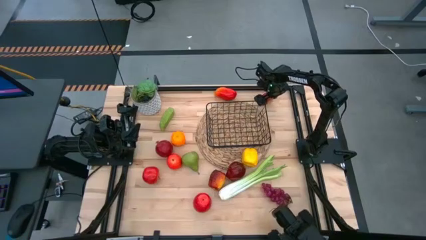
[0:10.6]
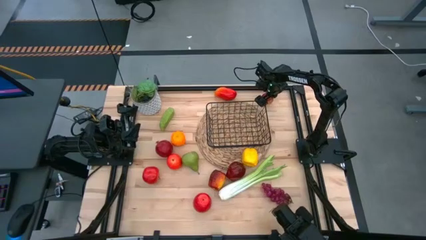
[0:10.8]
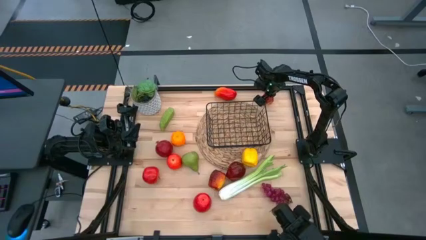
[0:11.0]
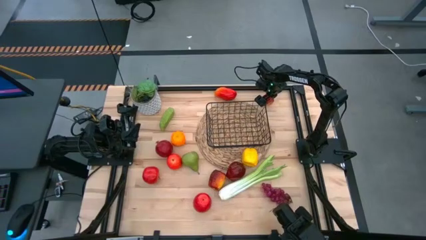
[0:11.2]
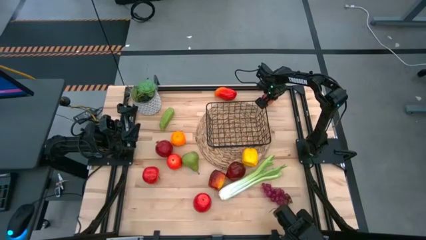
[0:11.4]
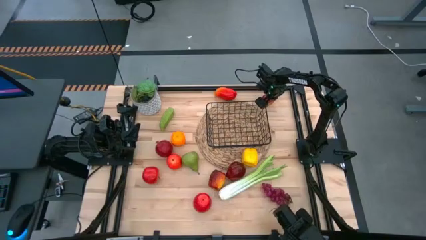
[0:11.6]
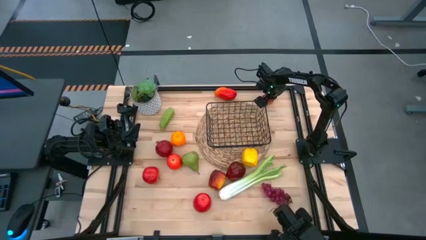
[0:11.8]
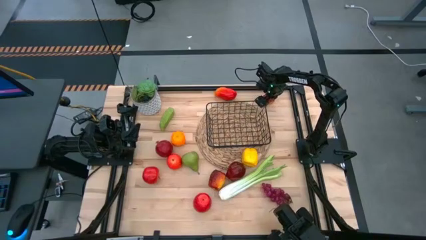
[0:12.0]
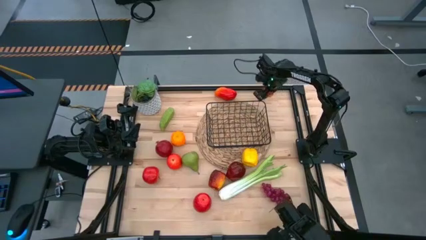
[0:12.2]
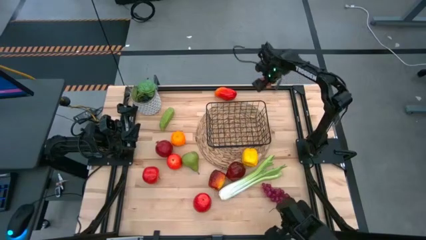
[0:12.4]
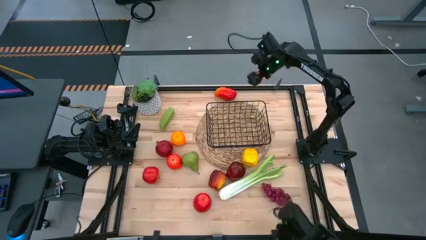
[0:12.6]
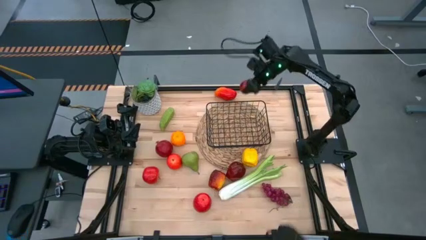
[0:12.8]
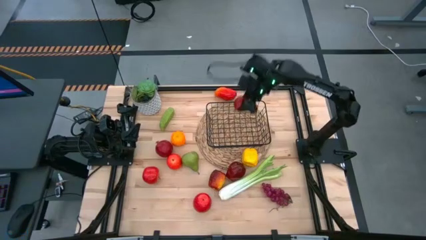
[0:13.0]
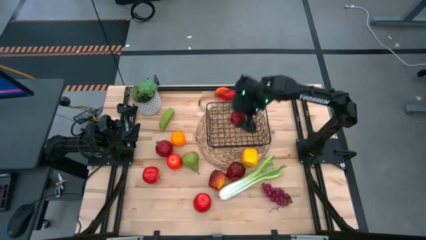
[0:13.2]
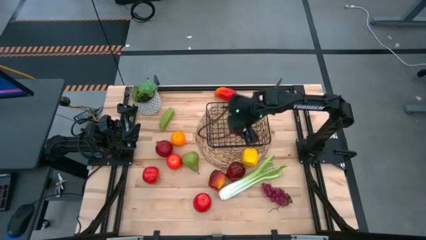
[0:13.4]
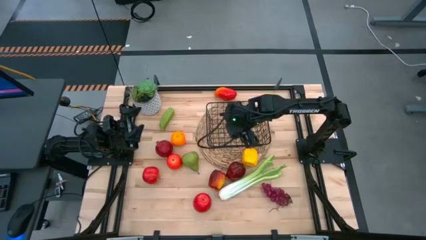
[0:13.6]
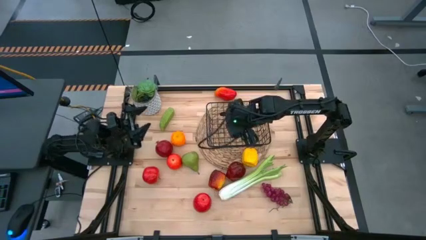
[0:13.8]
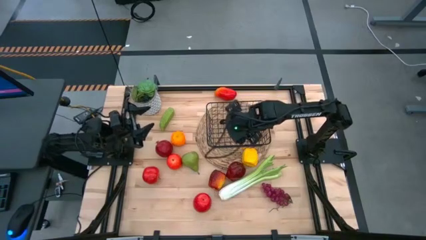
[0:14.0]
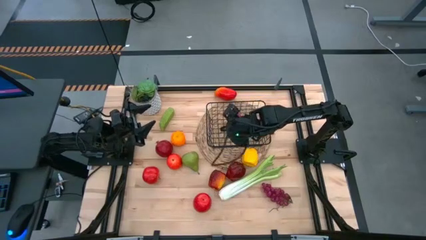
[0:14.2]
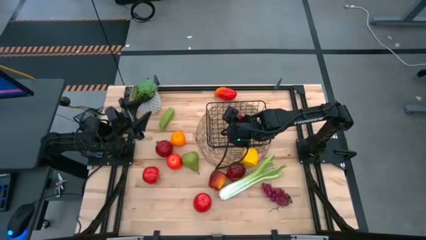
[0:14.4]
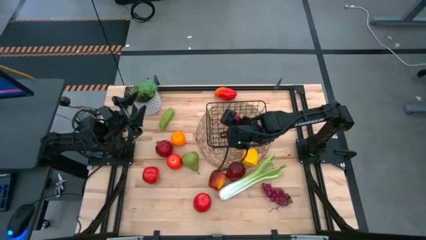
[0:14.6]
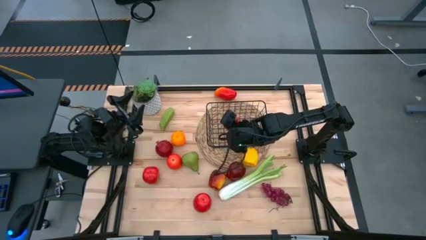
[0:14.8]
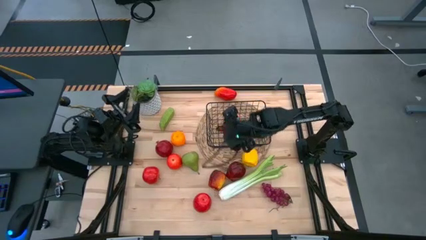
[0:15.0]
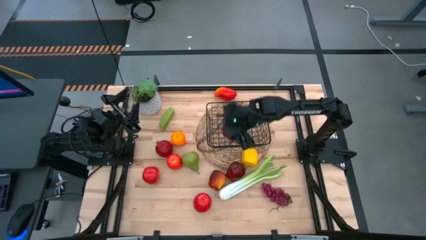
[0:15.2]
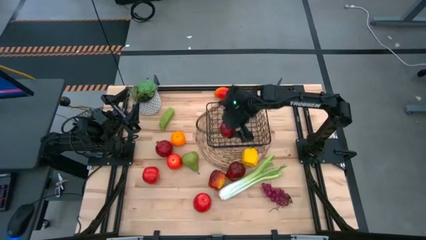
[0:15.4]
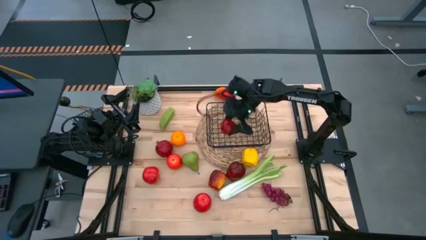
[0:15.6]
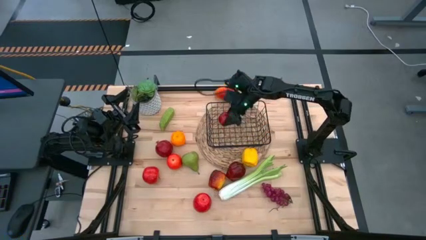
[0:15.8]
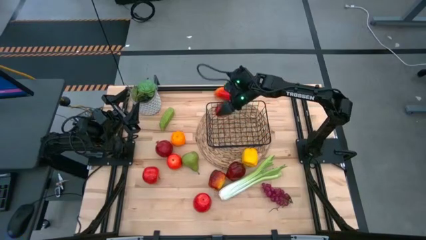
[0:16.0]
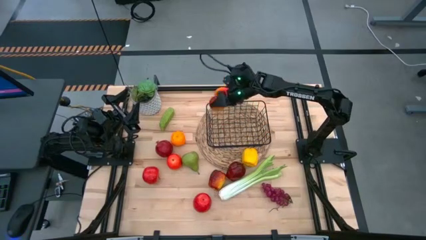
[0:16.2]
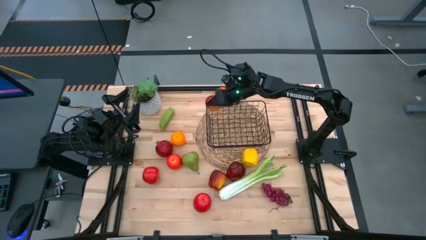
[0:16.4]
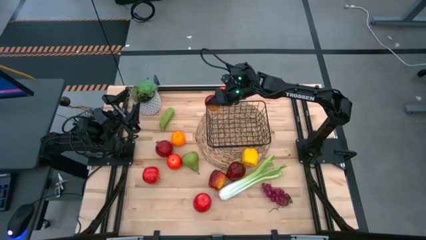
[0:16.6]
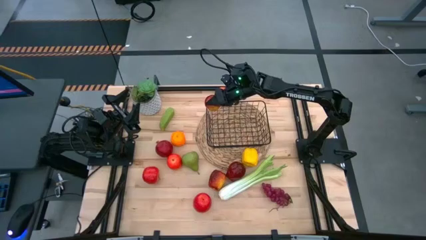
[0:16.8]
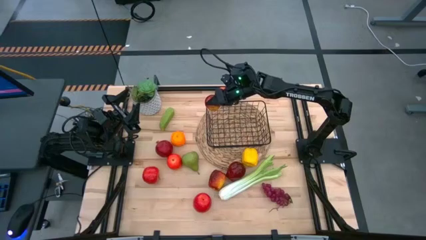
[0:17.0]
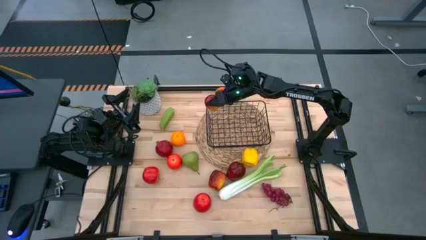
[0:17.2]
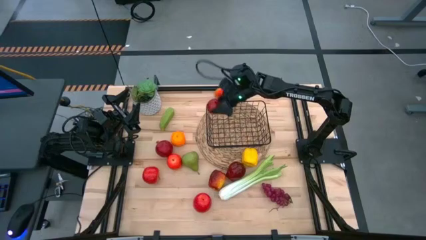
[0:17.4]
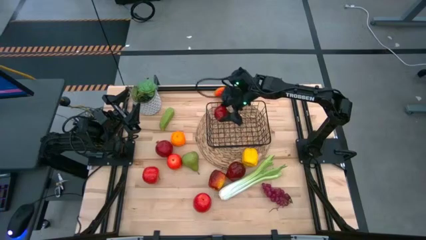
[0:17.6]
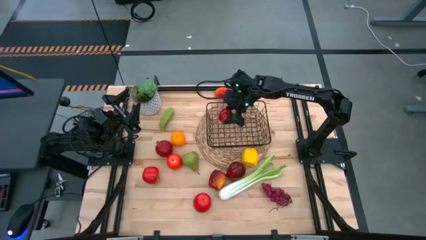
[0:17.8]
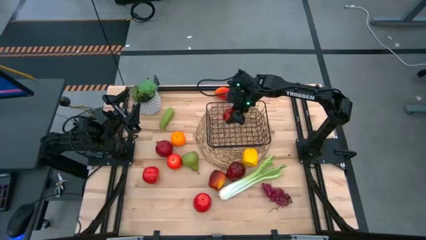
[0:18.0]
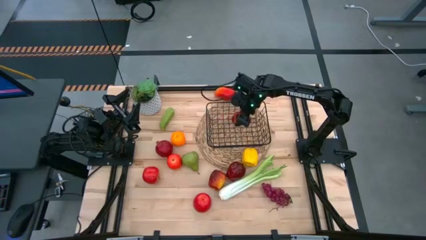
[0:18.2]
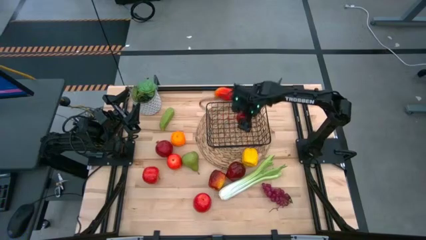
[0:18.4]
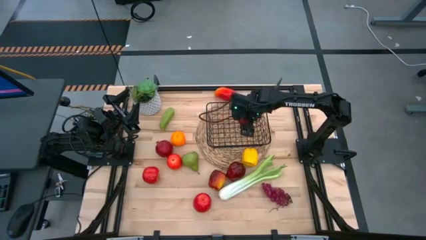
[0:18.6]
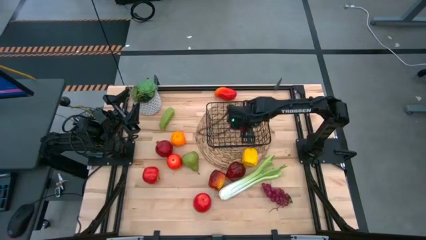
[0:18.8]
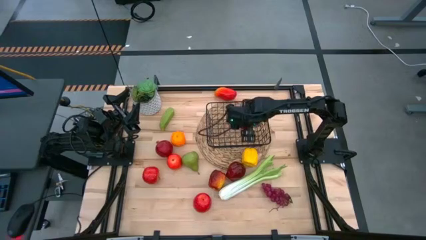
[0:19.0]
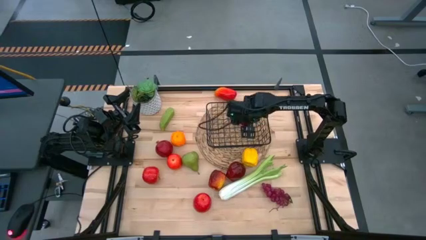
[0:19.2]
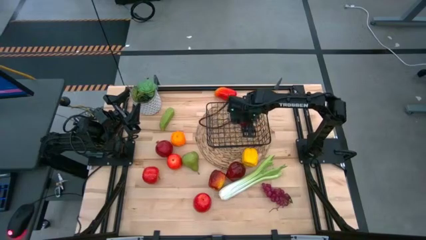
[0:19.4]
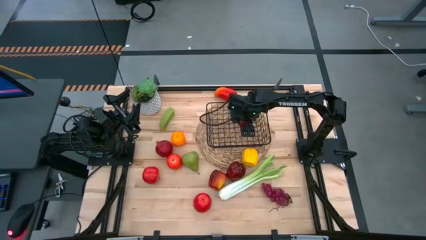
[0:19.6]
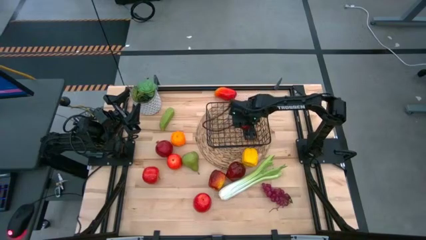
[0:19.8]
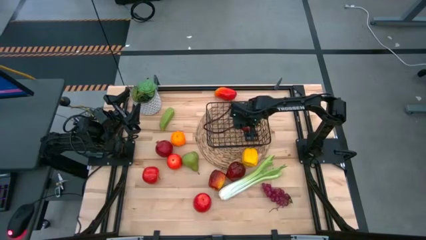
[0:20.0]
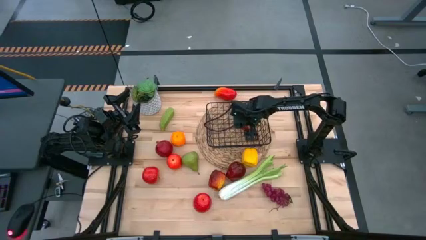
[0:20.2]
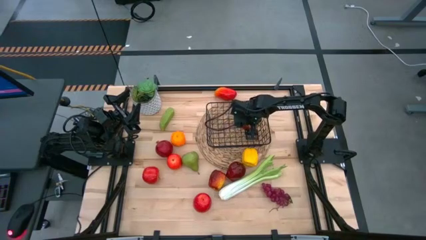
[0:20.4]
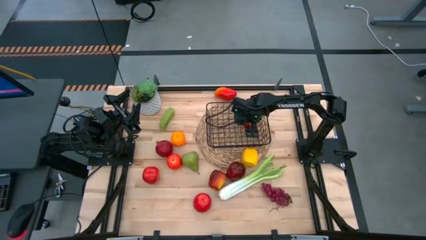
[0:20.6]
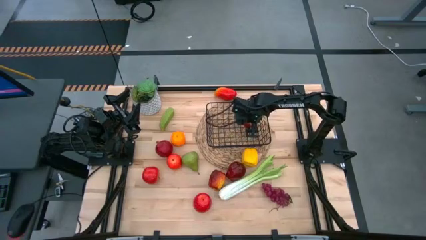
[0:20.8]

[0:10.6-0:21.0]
Task: Build produce basket
Put the red apple into the black wire basket

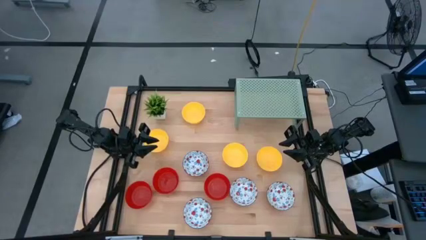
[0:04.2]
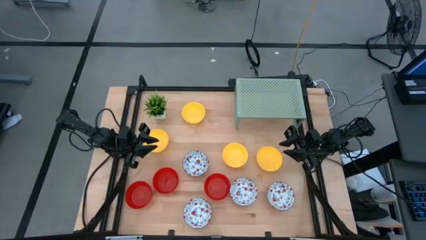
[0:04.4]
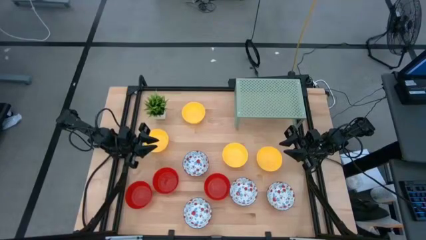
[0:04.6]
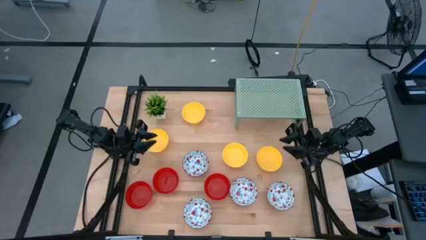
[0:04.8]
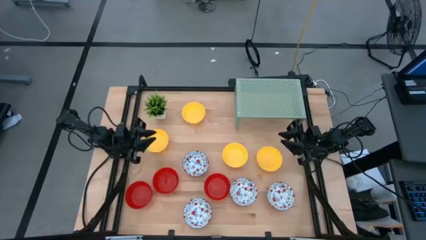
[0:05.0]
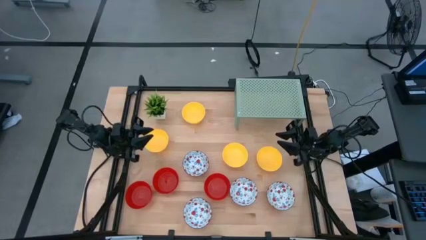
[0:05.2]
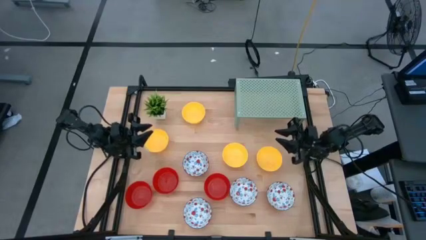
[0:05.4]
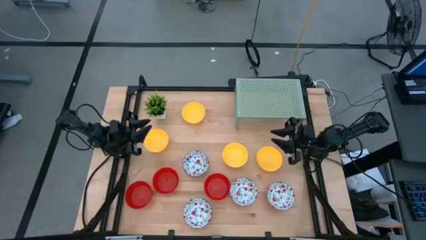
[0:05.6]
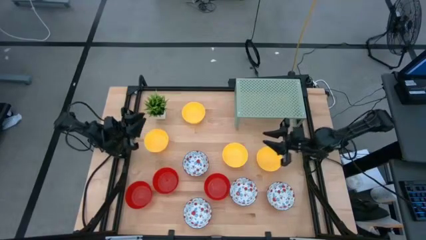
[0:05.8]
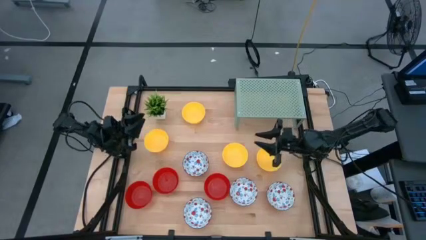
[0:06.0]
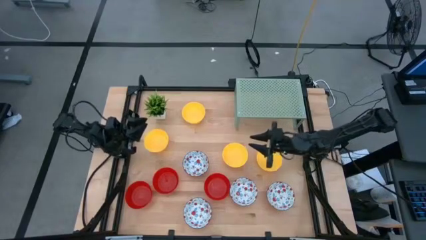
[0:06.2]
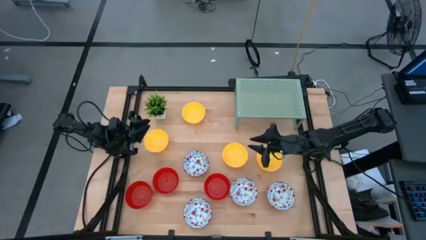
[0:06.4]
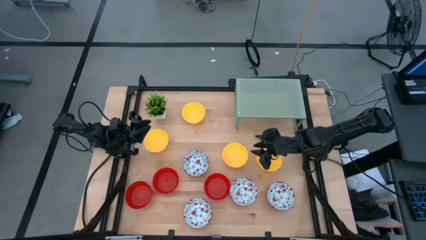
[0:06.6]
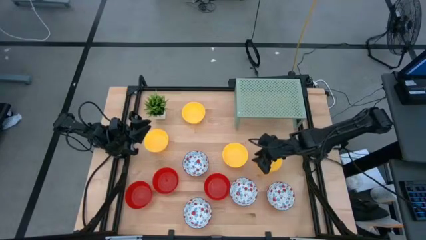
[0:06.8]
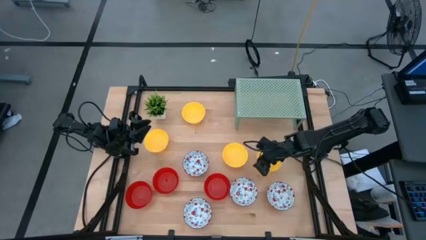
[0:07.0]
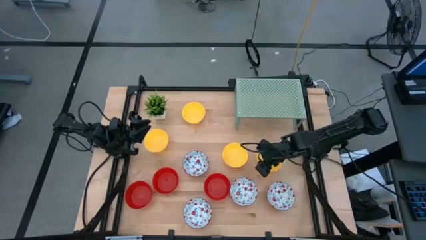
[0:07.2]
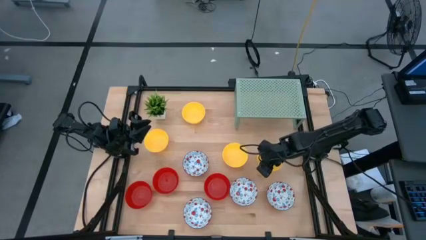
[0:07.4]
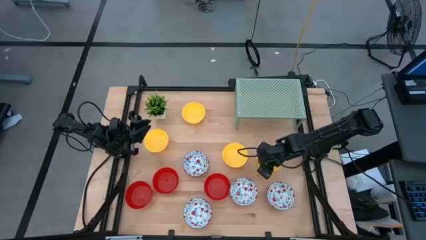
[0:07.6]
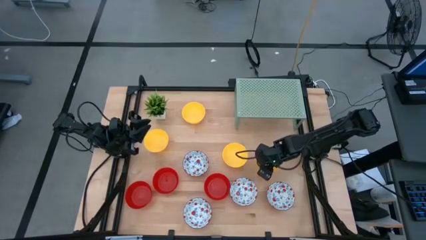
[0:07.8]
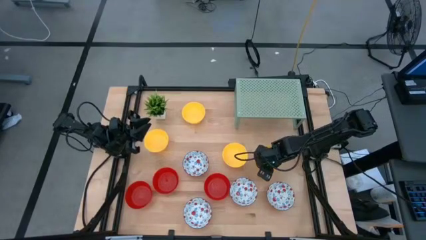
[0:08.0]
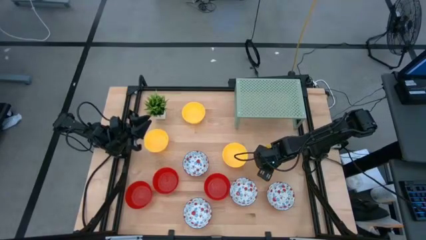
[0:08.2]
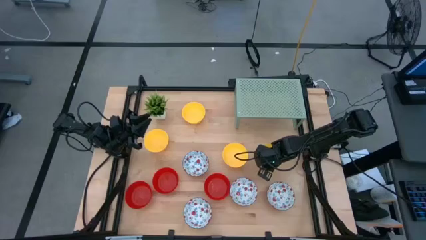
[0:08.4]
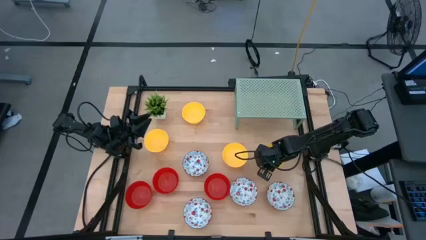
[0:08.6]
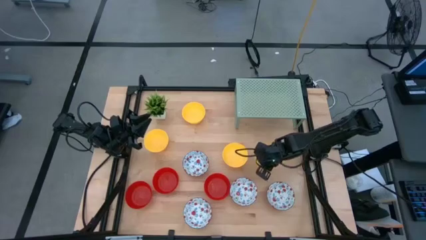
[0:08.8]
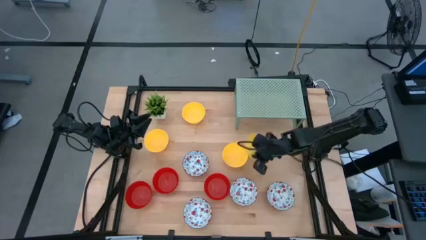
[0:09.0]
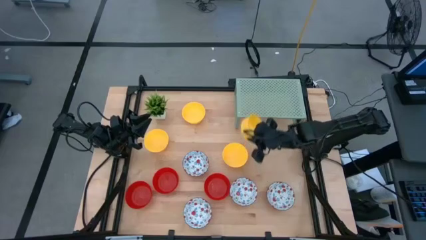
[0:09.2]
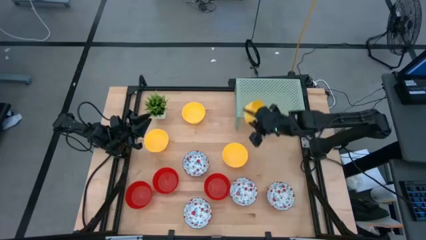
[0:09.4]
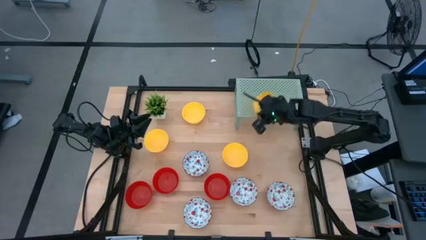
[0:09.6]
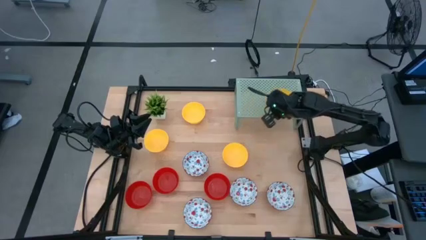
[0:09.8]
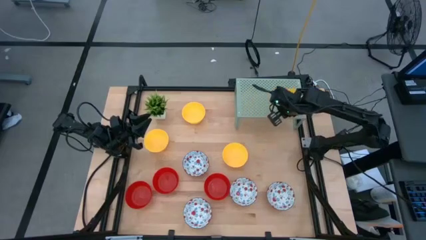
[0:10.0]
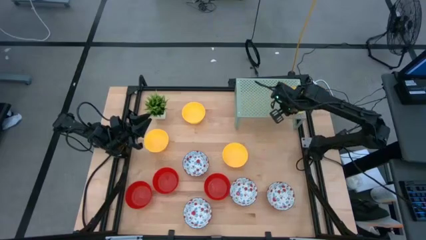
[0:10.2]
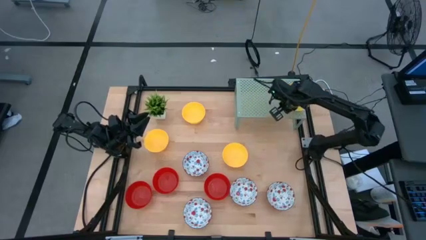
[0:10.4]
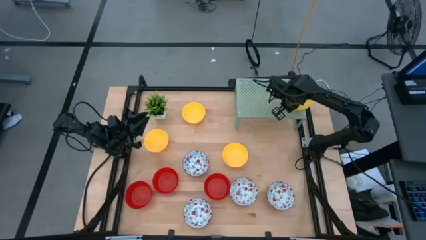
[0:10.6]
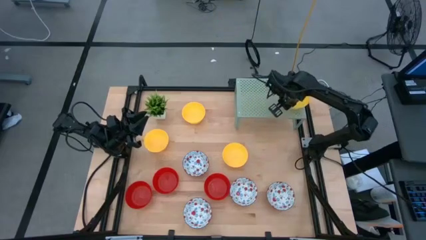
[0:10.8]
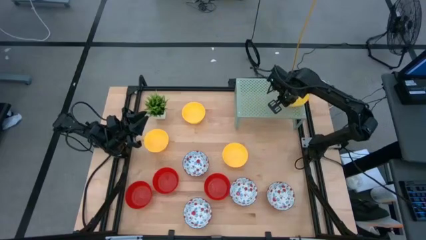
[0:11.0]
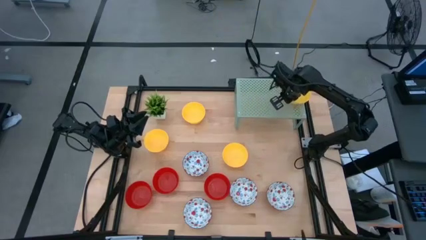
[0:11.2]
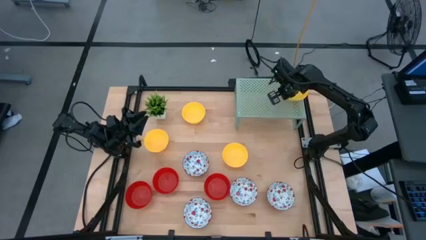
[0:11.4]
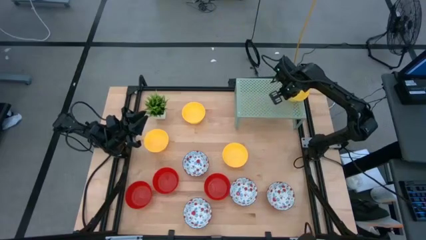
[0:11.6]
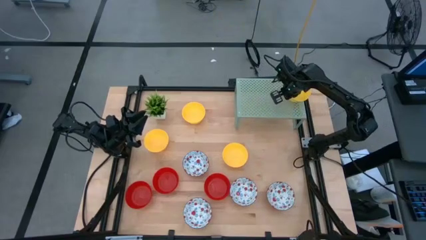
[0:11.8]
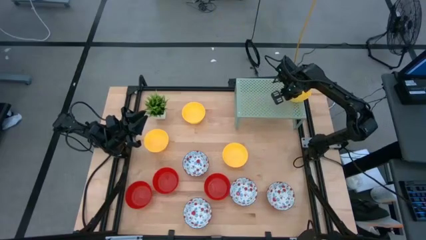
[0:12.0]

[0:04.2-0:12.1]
Task: Pick & Place Mini bowls
Put the yellow bowl on the shelf
